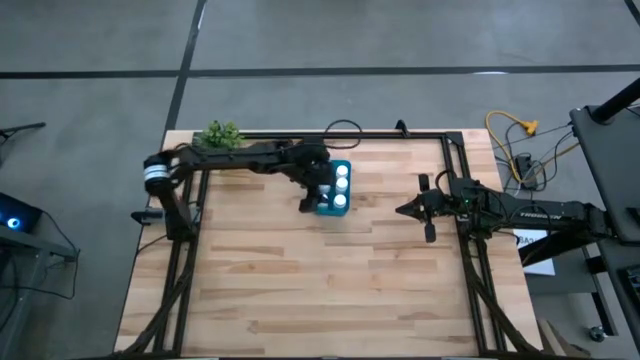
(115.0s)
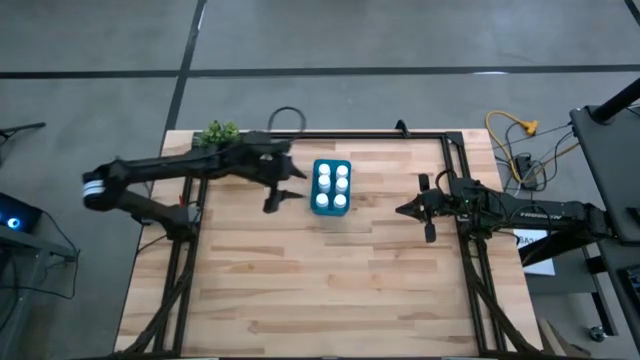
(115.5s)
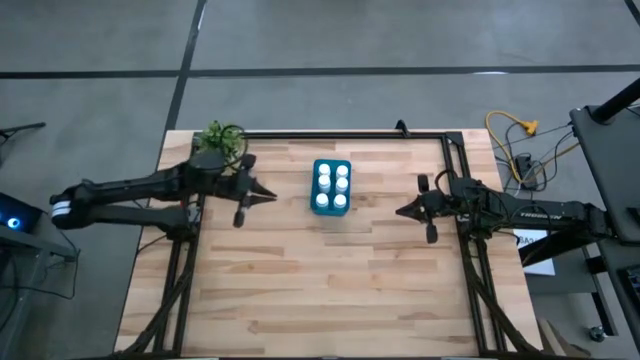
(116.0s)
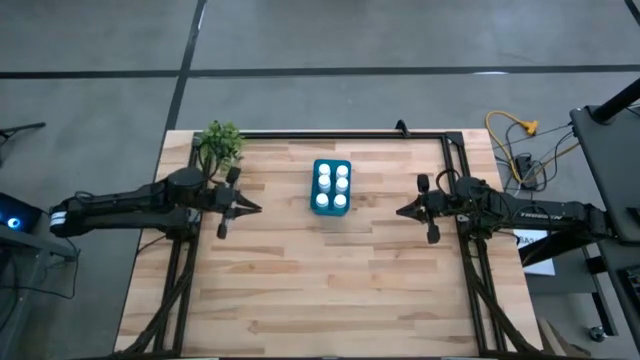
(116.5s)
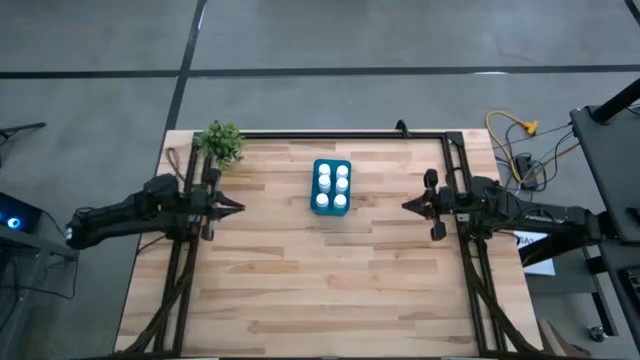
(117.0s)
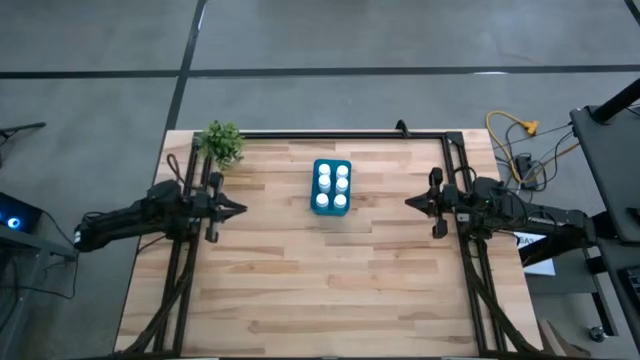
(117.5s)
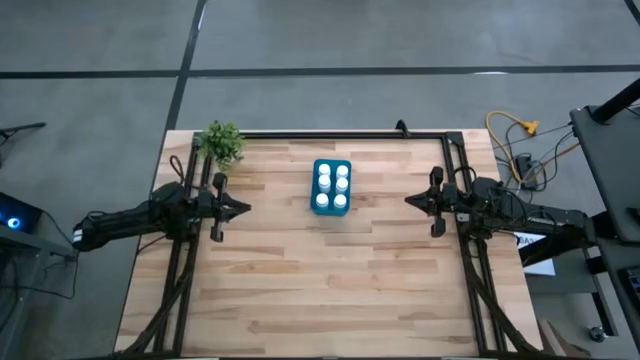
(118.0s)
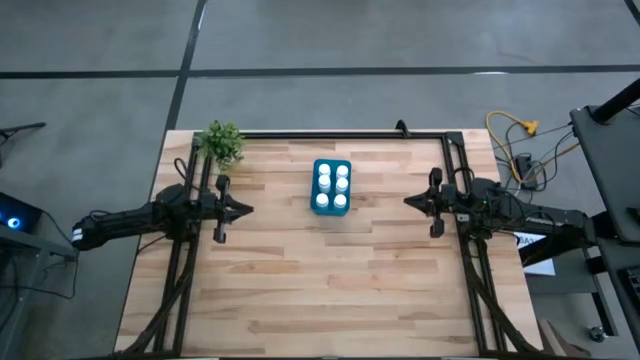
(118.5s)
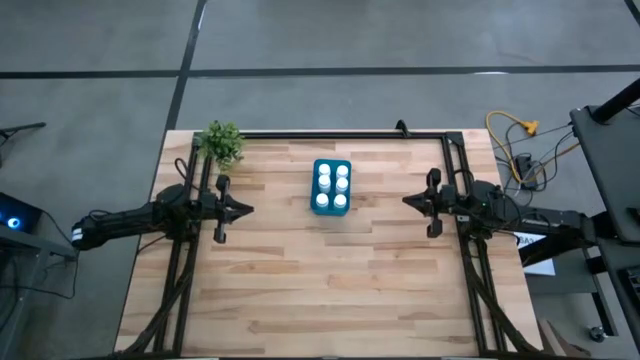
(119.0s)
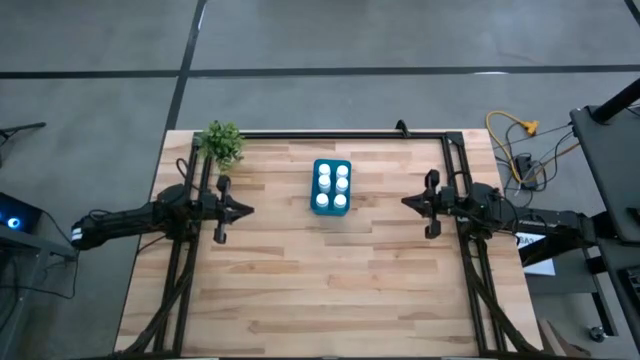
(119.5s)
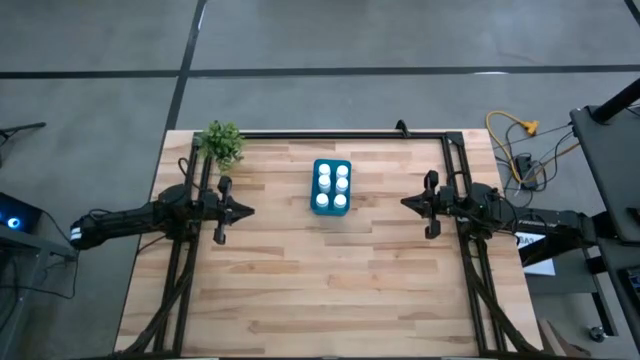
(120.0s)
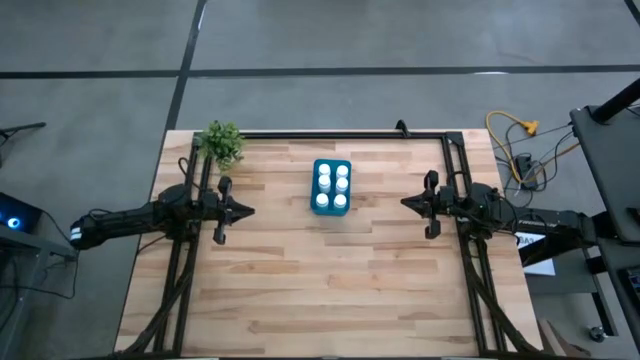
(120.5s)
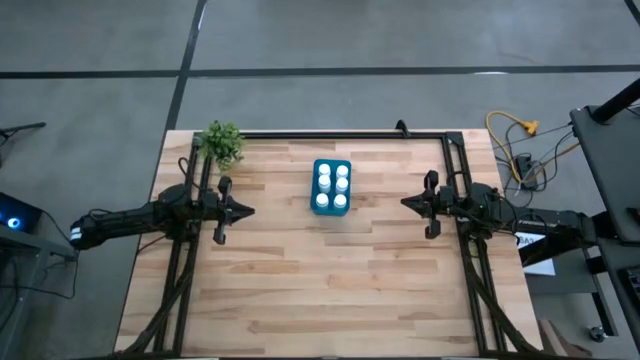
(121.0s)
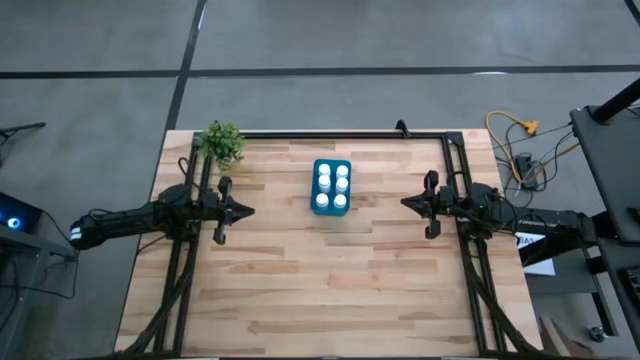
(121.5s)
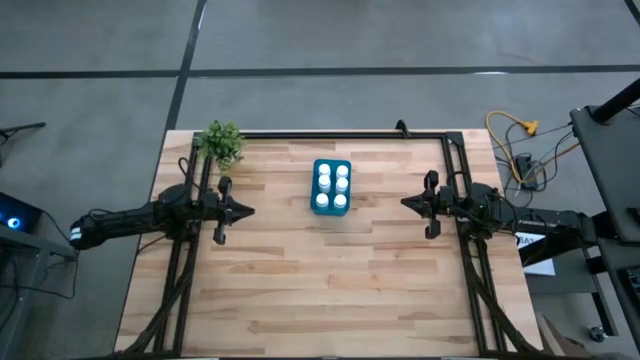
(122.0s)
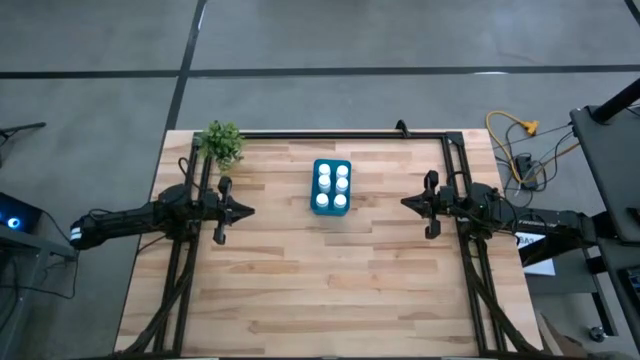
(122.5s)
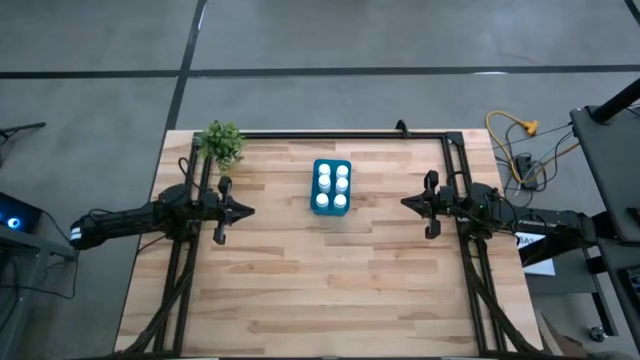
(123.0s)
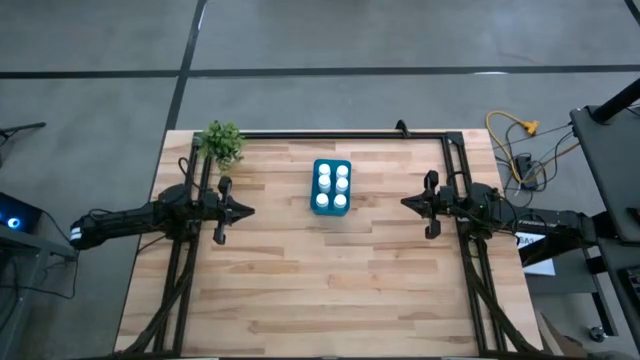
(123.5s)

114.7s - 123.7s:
Task: Pick and place pill bottles into a basket
Return to Home Position

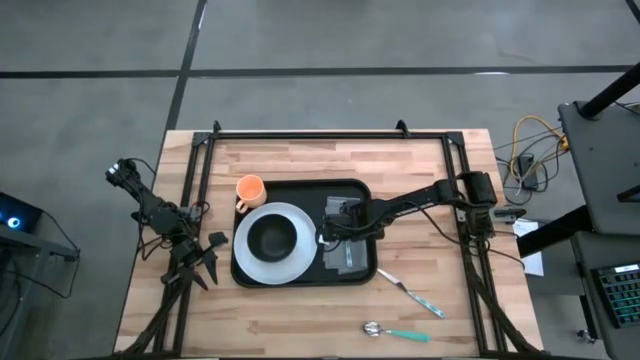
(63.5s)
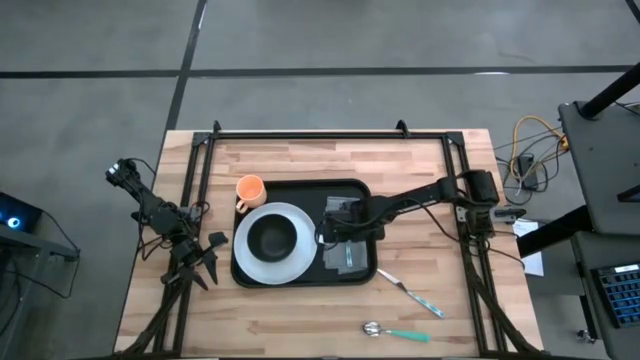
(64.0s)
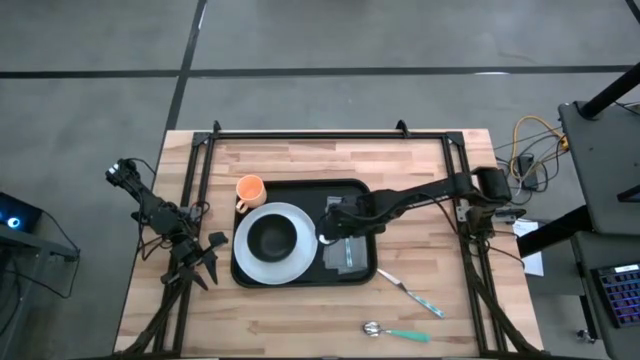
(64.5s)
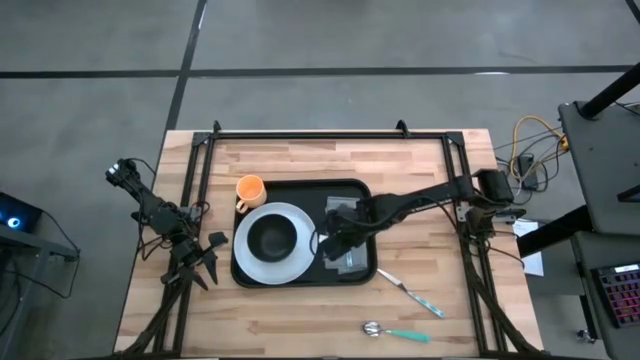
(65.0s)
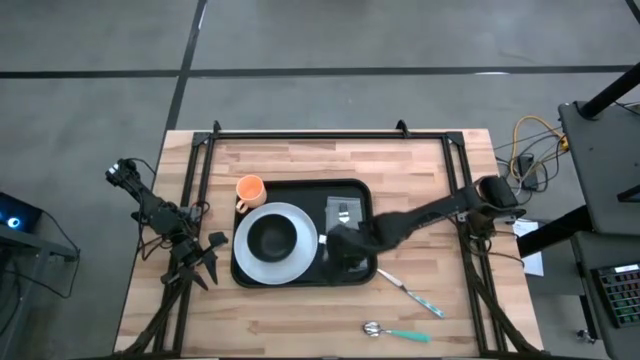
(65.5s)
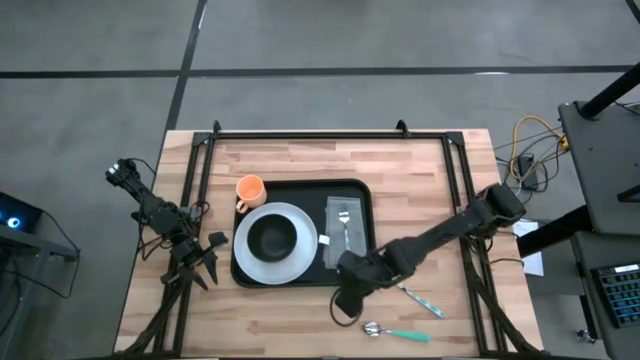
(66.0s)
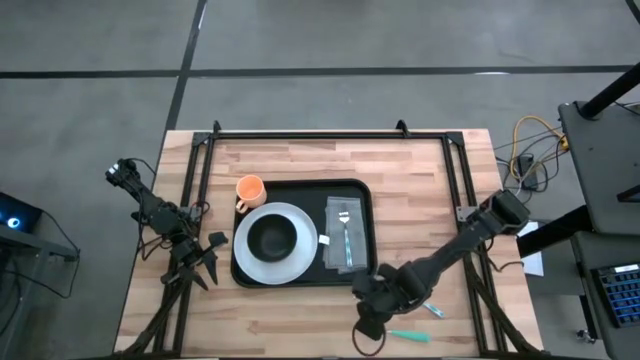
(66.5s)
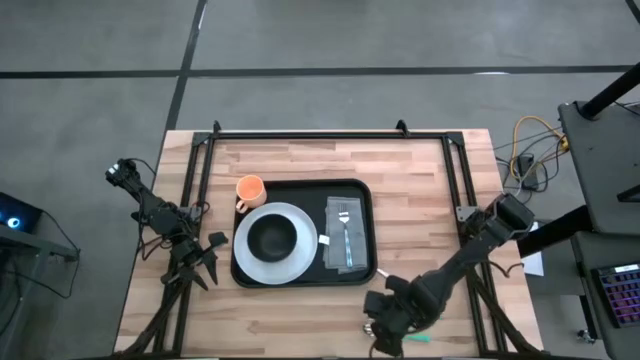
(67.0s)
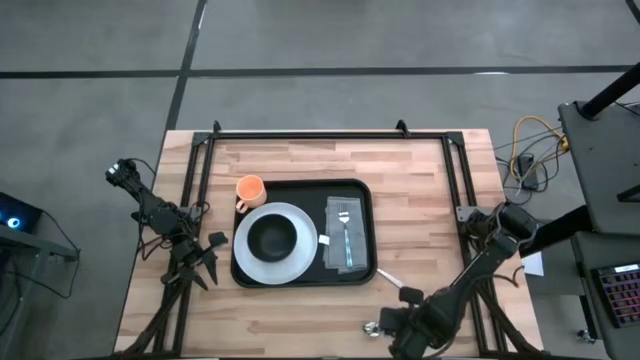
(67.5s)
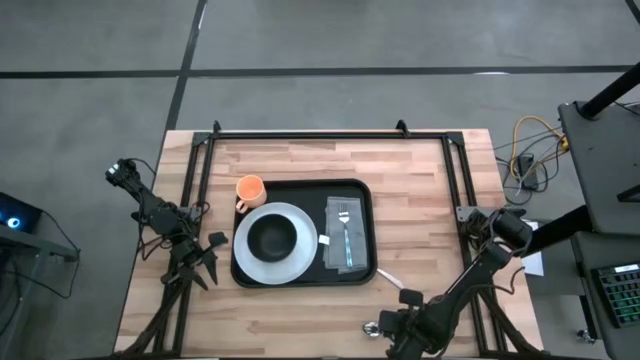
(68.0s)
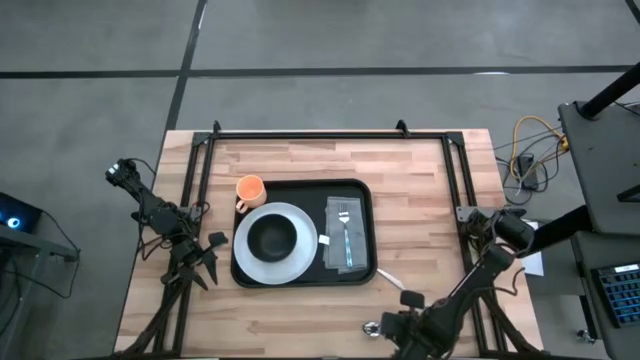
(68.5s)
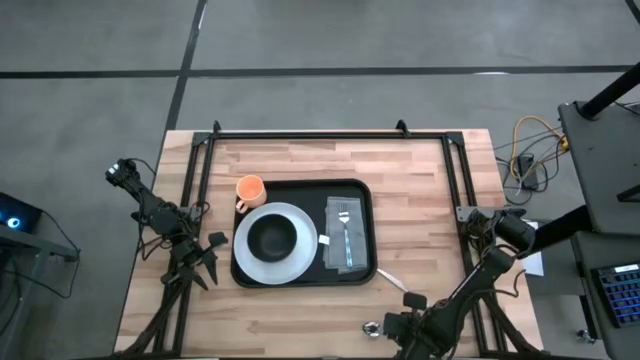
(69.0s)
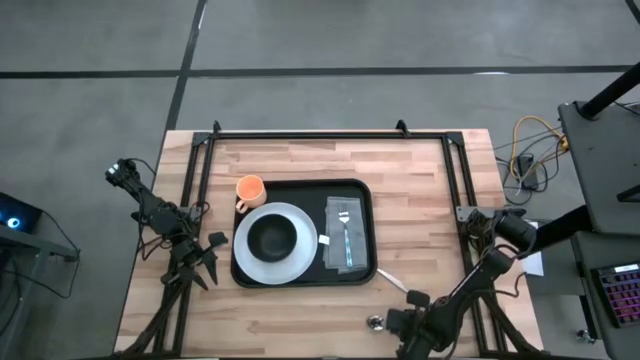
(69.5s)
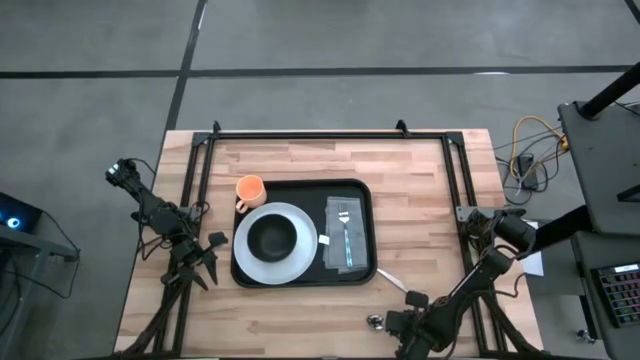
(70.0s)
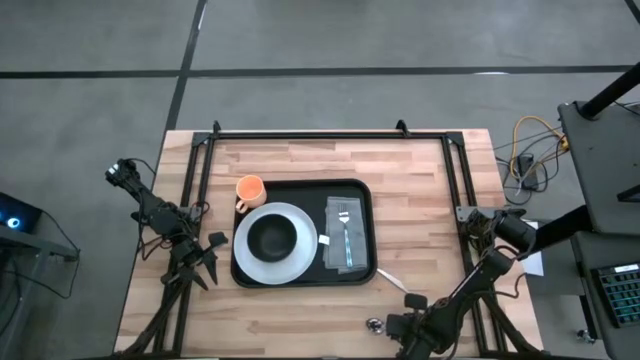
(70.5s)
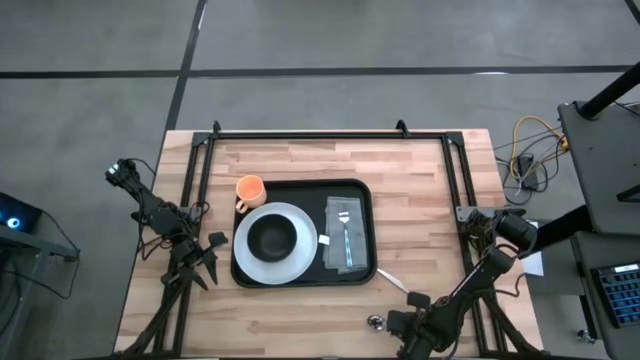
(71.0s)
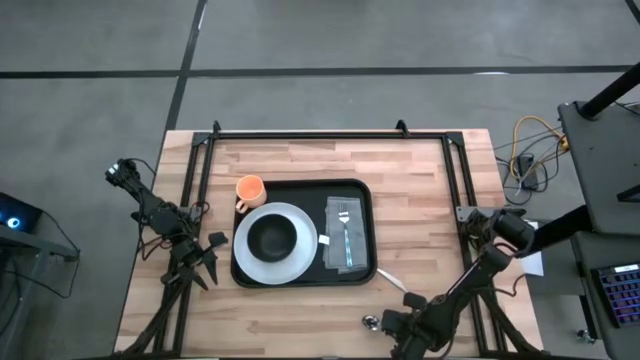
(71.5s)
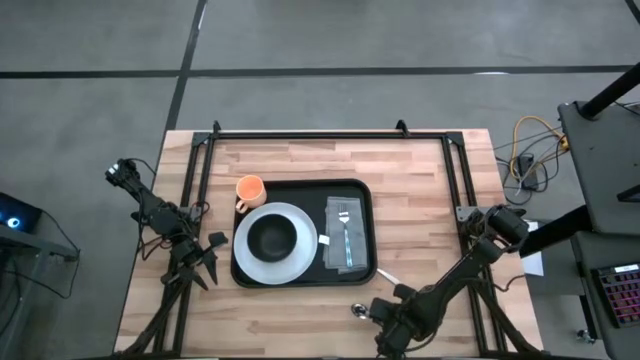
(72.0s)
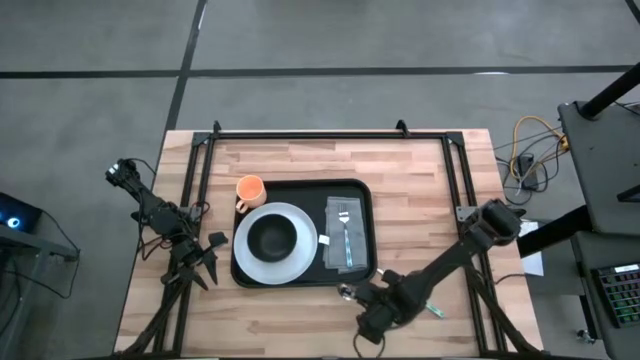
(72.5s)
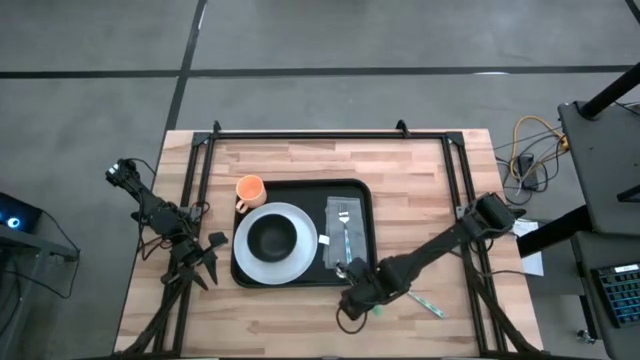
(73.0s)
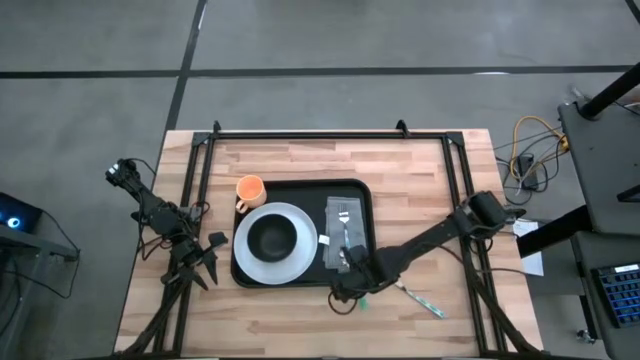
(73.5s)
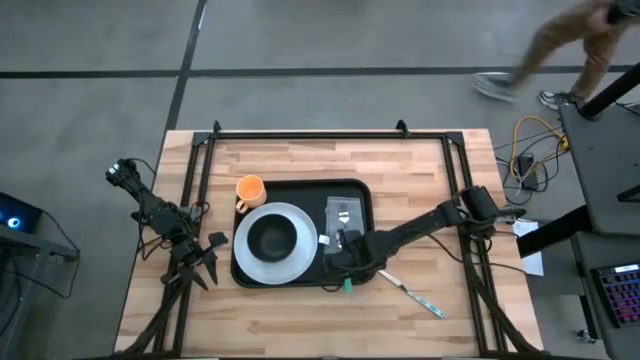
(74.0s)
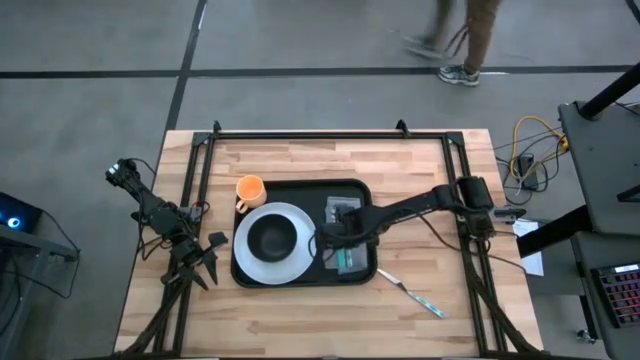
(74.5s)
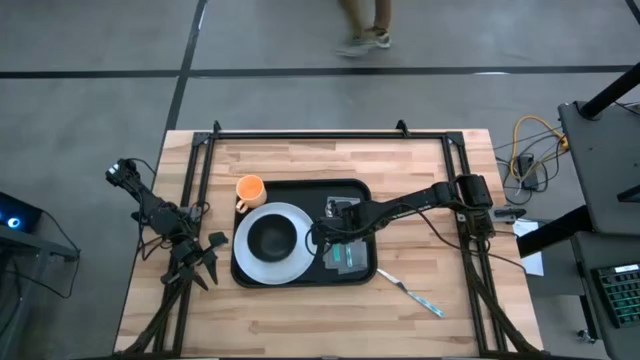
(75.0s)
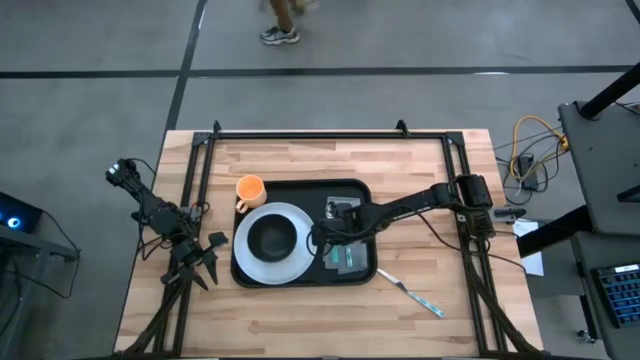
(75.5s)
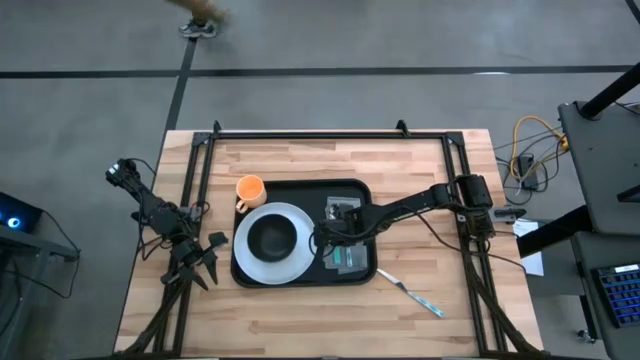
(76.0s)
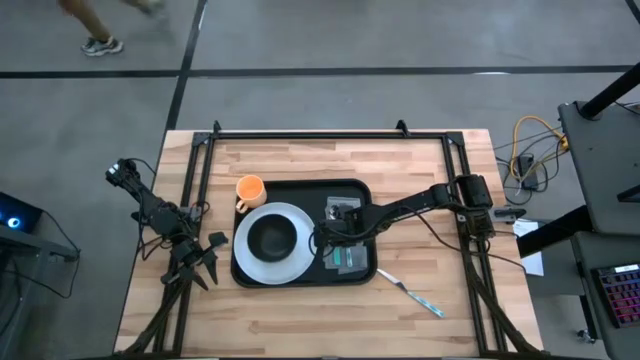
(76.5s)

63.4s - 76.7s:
Task: Set up tray
Put the green spoon on the gray napkin to the left of the white and blue fork
